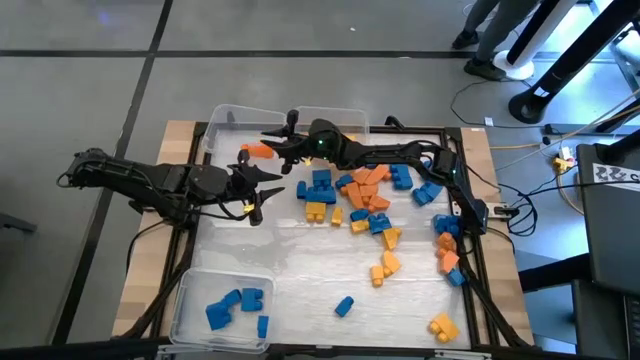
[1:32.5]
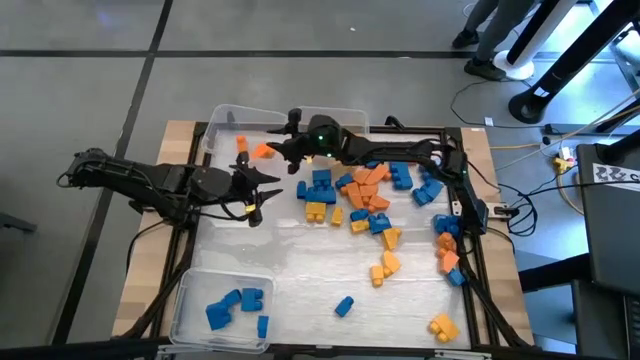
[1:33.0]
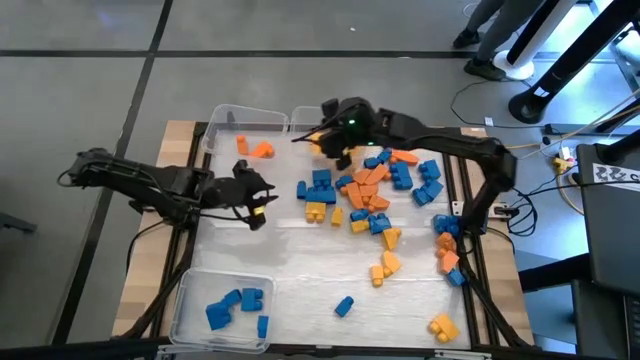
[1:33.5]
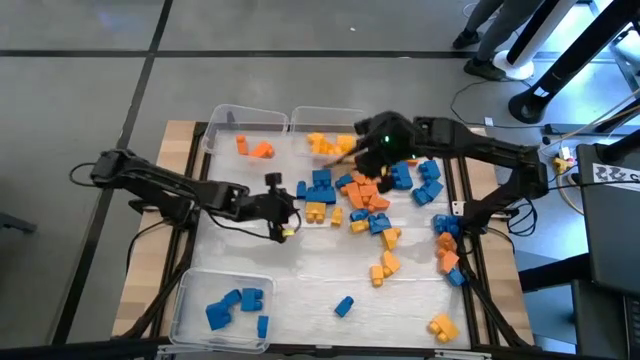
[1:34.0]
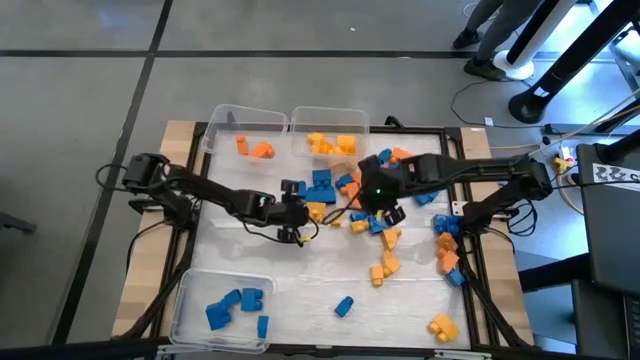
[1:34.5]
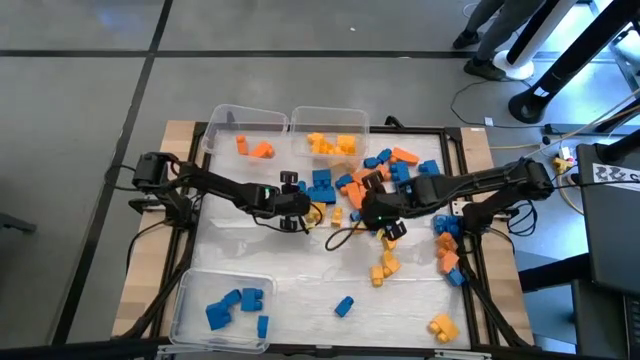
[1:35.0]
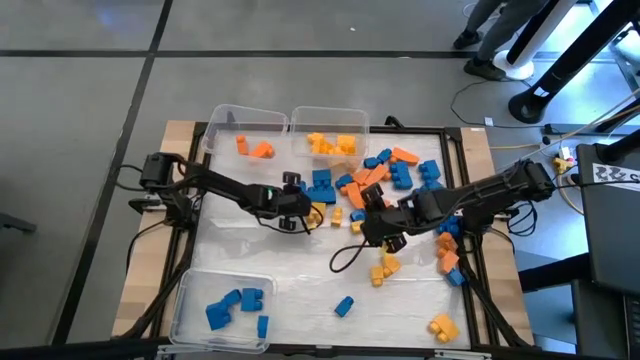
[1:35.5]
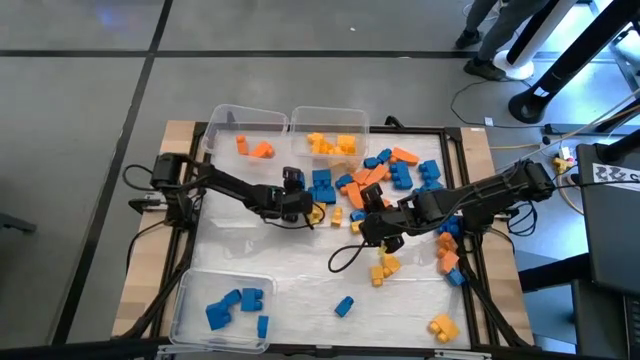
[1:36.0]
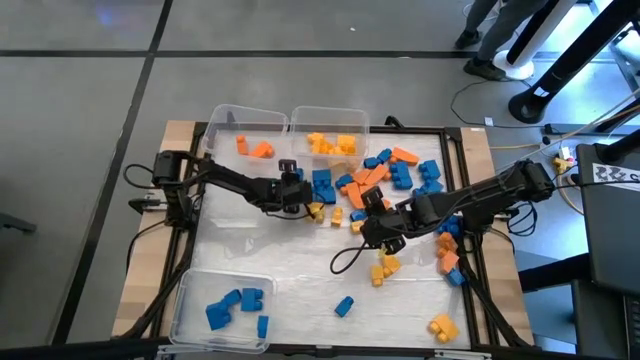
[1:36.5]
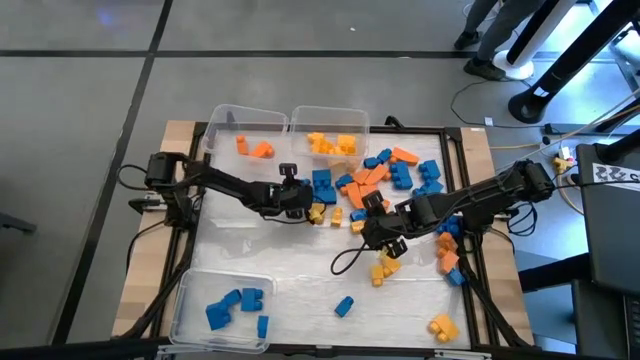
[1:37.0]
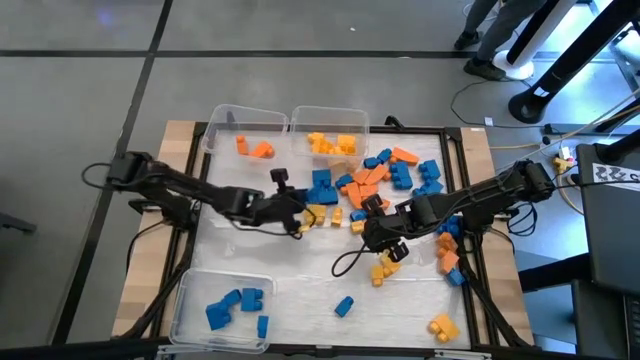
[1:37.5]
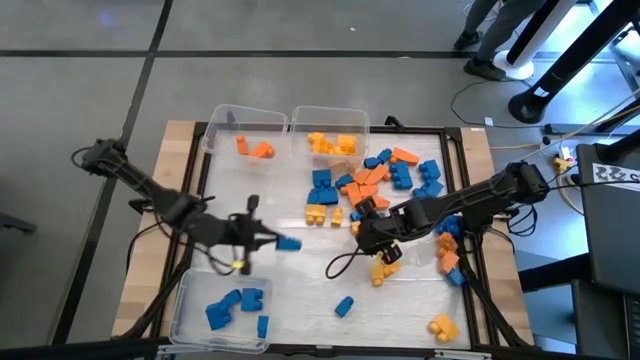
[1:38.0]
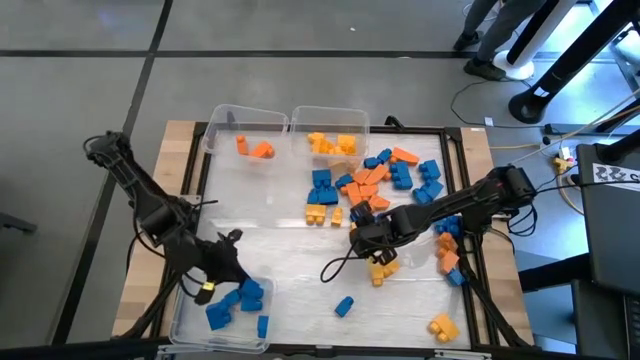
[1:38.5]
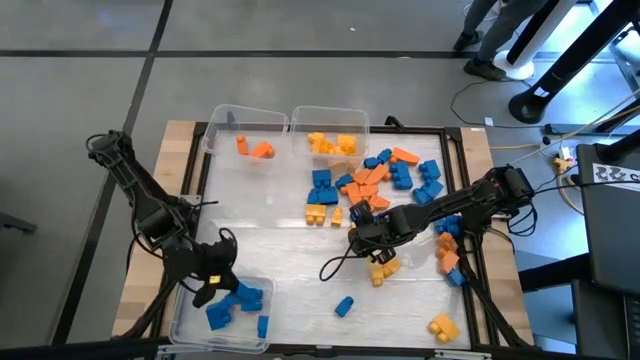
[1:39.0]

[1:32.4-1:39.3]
Task: Sort blocks
Put the blue game piece into the bottom transparent bin

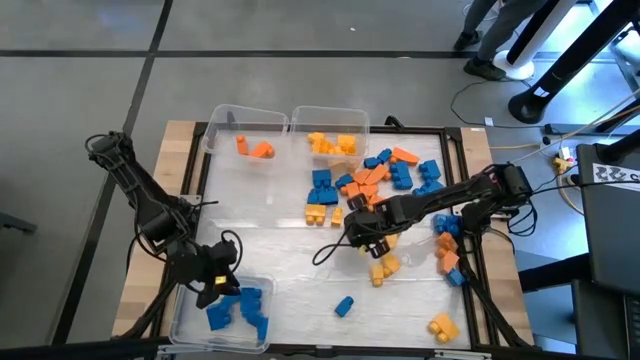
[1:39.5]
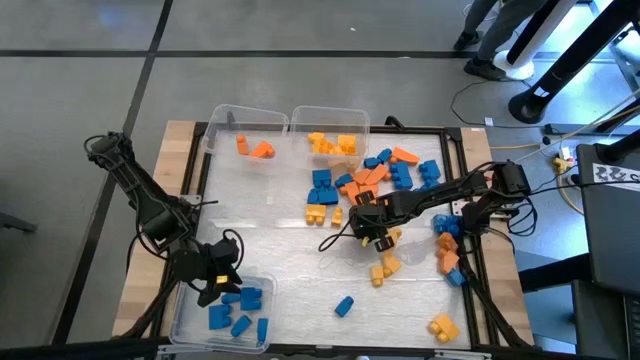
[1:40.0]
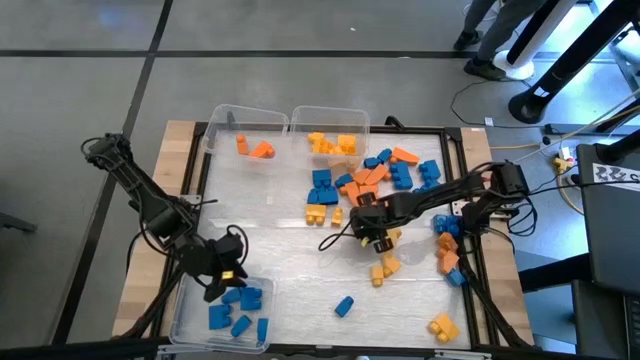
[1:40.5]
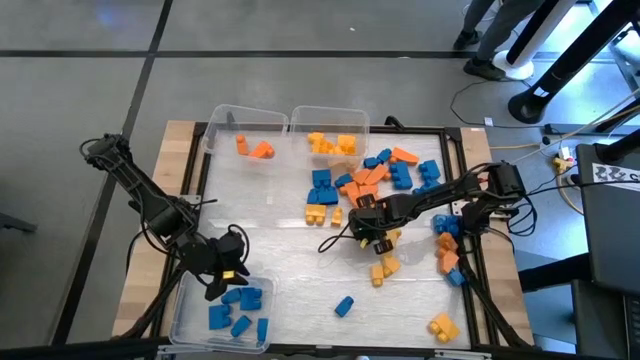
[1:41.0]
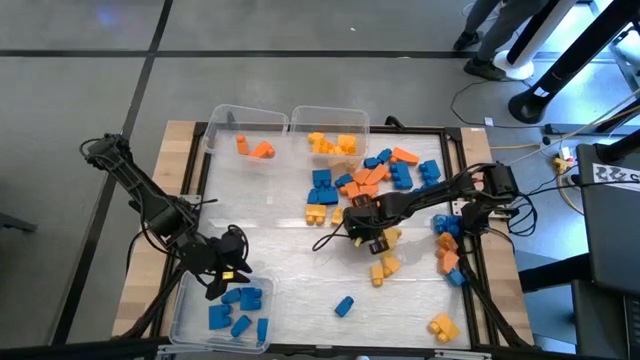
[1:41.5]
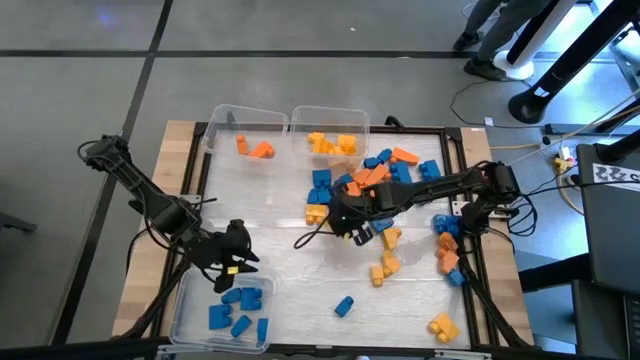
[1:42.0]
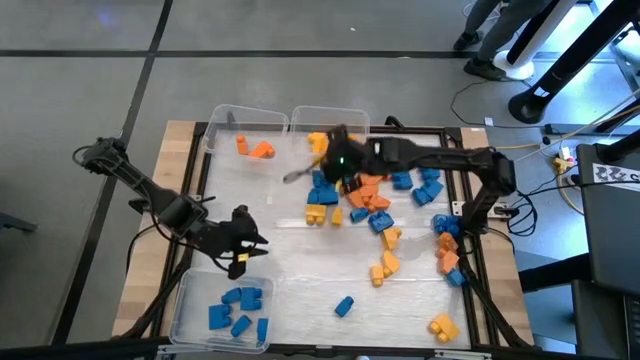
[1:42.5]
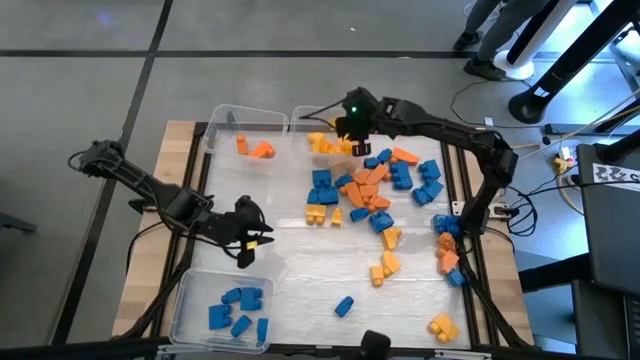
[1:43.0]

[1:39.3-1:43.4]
Put the yellow game piece into the top right transparent bin

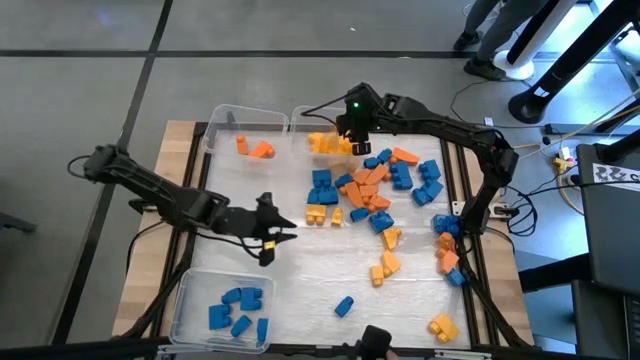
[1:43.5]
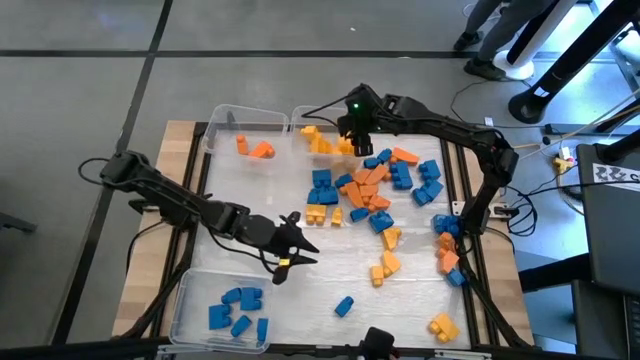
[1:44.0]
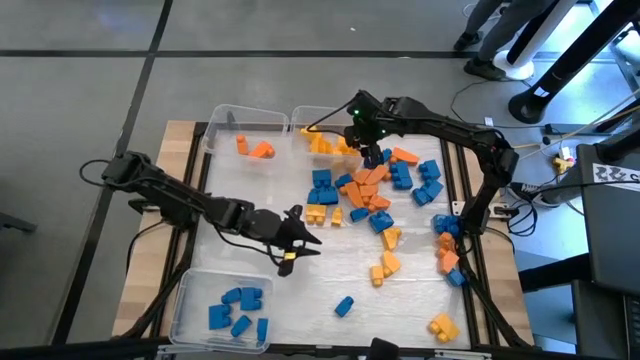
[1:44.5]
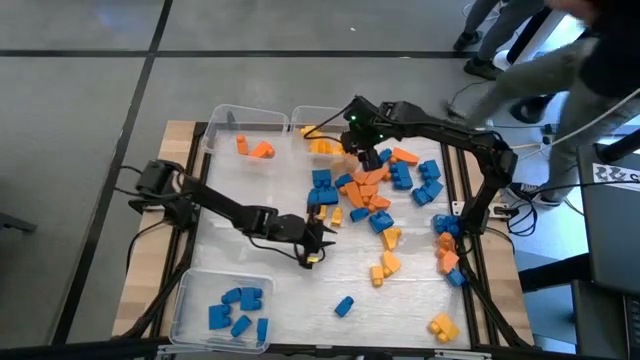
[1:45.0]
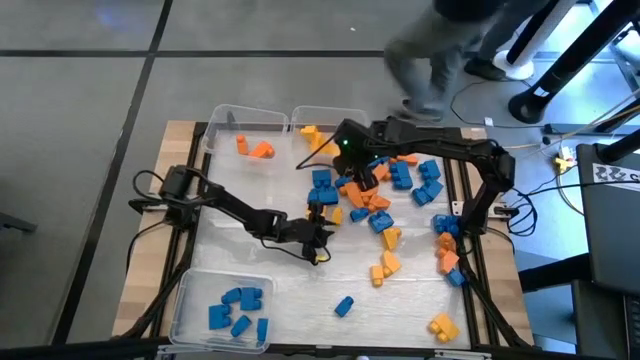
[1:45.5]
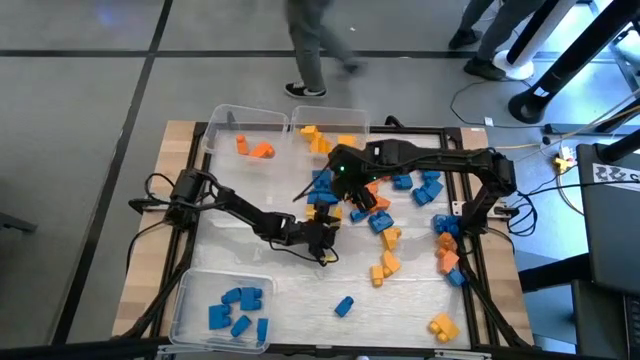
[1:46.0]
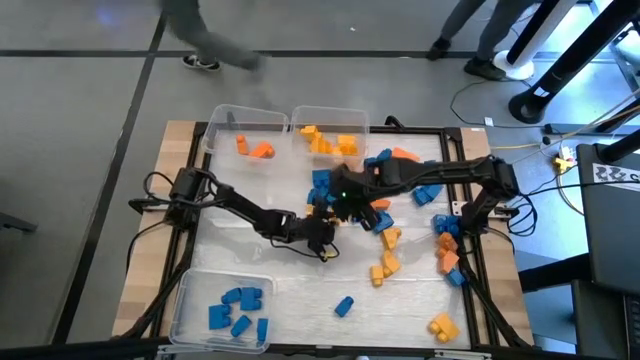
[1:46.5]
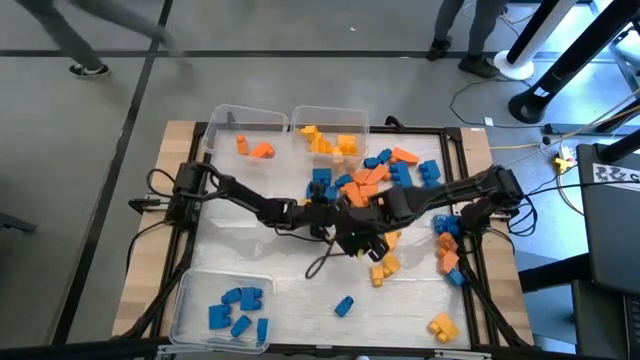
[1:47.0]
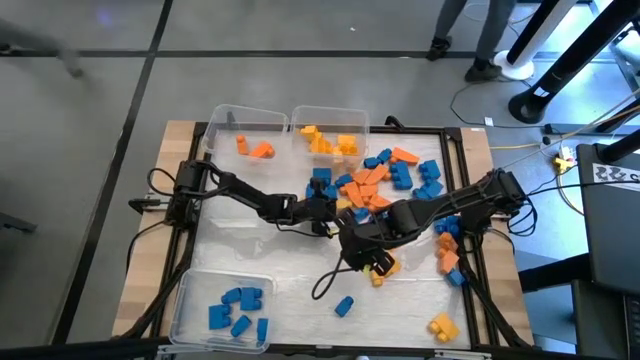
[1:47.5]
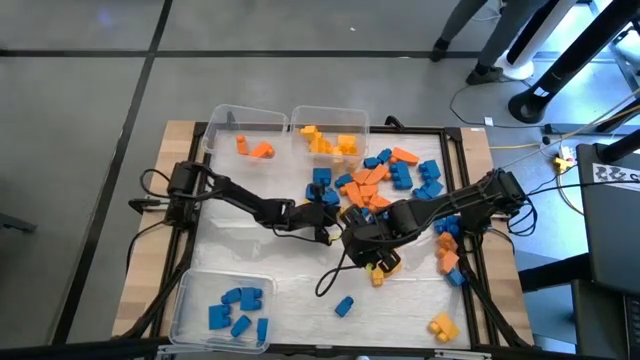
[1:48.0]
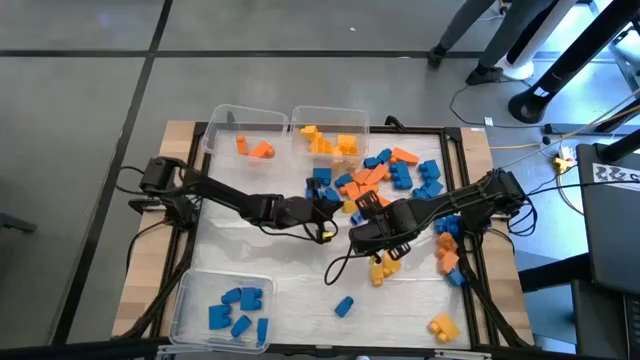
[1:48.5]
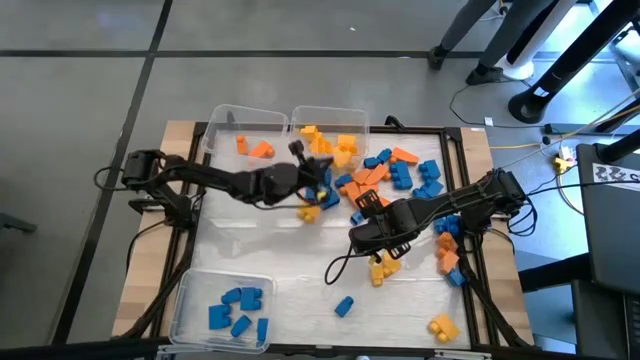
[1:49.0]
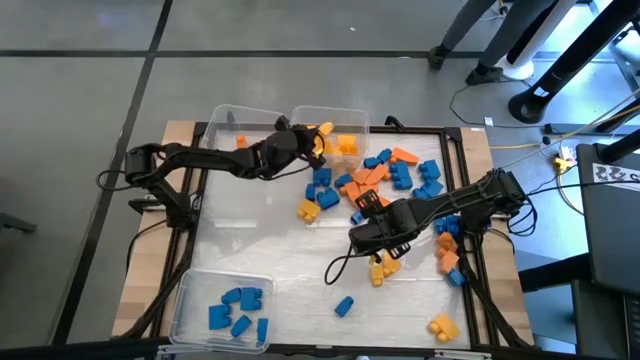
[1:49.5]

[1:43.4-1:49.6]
Put the yellow game piece into the top right transparent bin

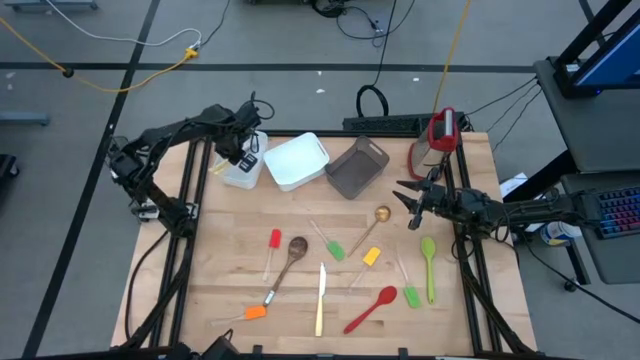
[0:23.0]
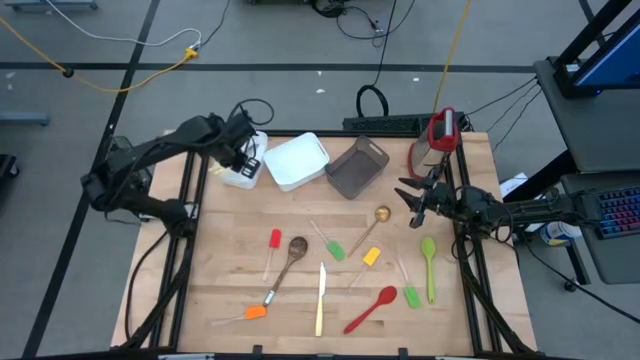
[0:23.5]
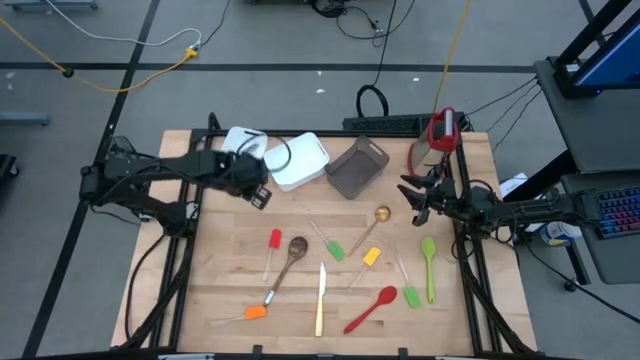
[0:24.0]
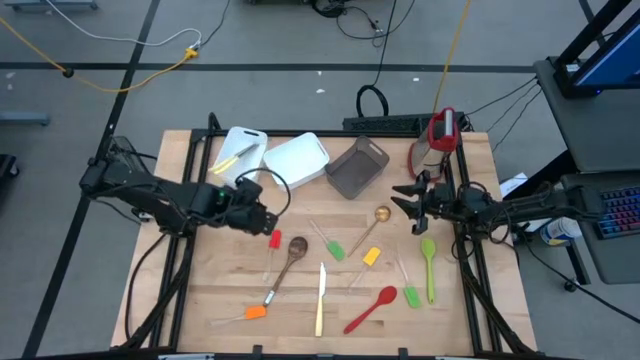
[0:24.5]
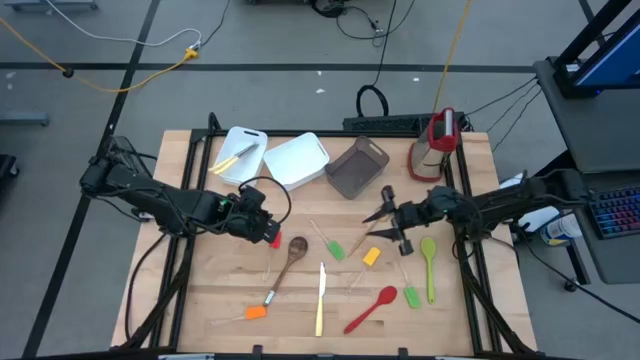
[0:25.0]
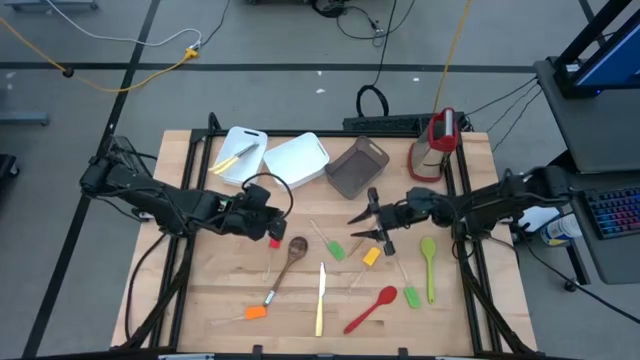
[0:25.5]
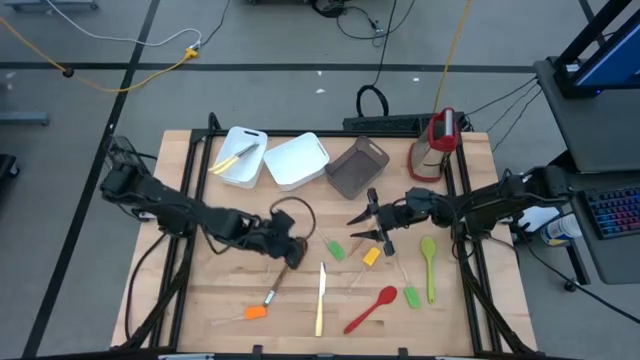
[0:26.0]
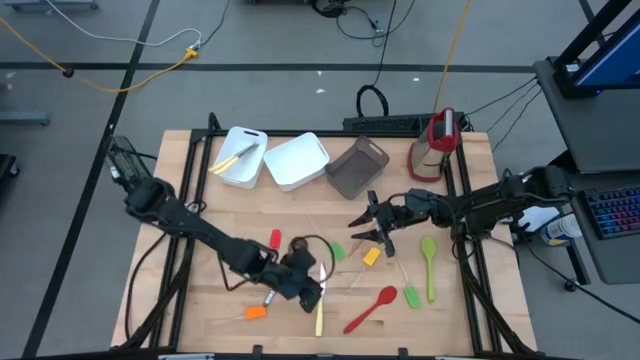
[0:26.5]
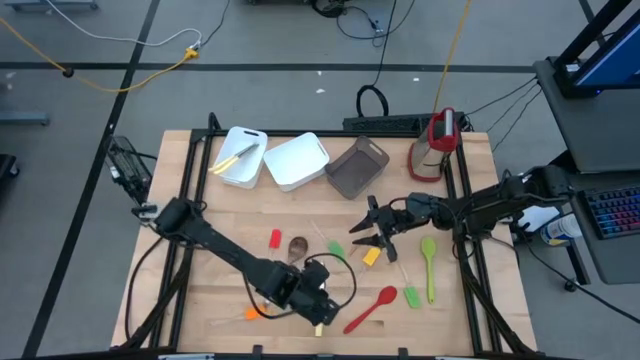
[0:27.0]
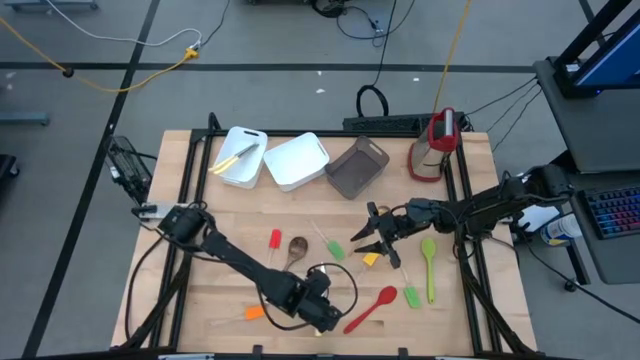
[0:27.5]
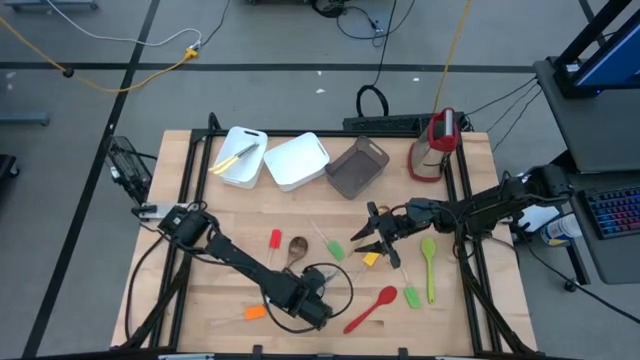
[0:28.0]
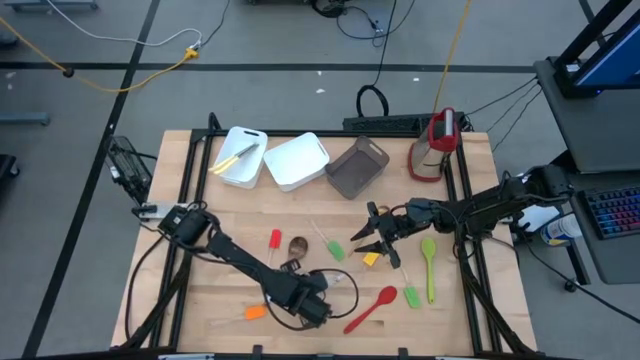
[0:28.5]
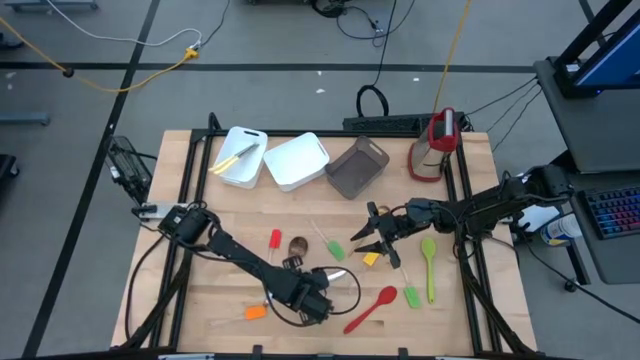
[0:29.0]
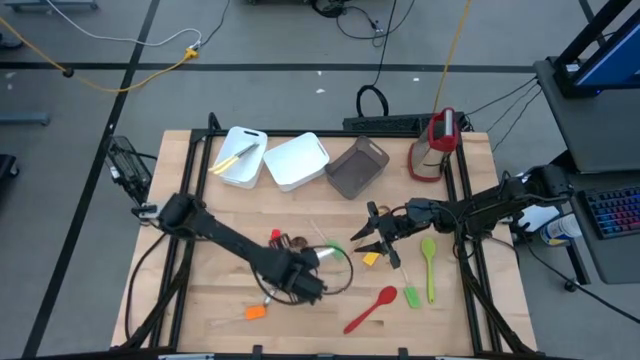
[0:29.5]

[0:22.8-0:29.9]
Task: Pick & Place Kitchen Items
Put the yellow kitchen knife into the left white bin
